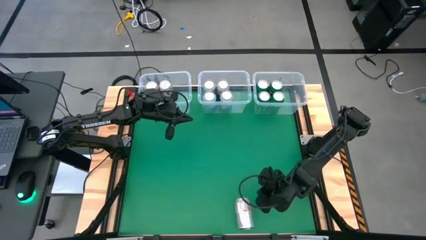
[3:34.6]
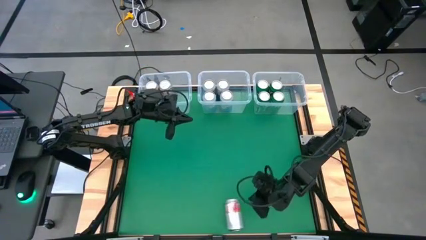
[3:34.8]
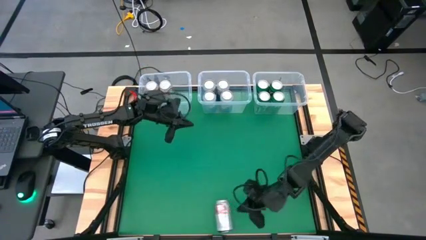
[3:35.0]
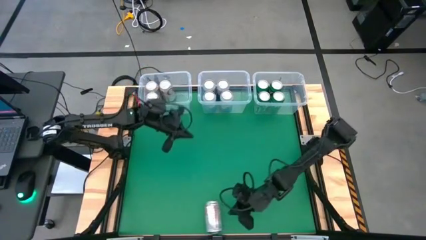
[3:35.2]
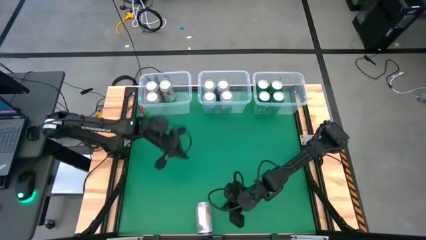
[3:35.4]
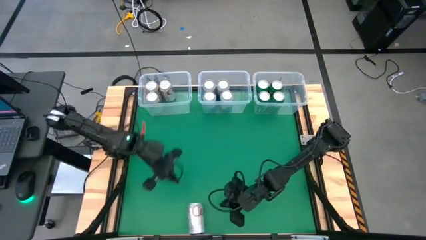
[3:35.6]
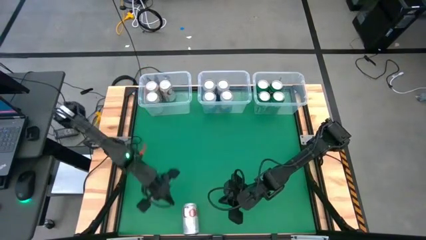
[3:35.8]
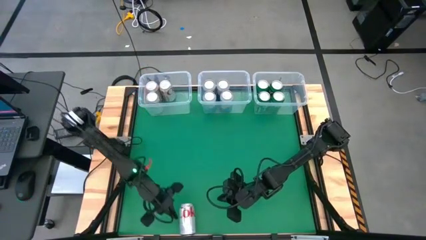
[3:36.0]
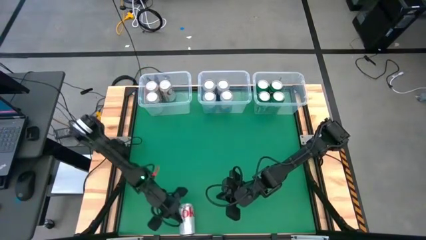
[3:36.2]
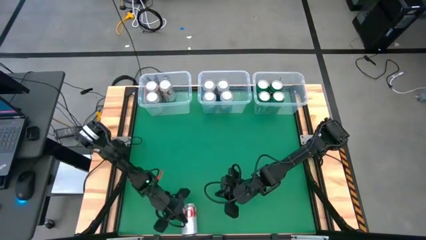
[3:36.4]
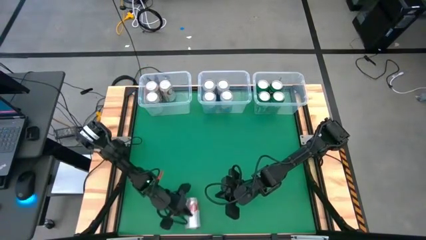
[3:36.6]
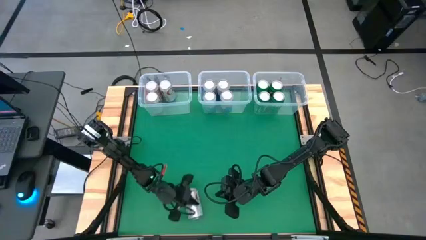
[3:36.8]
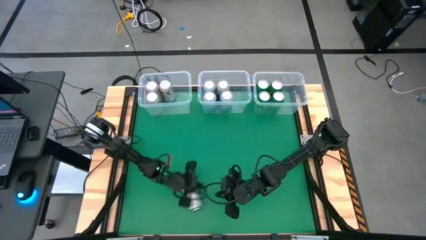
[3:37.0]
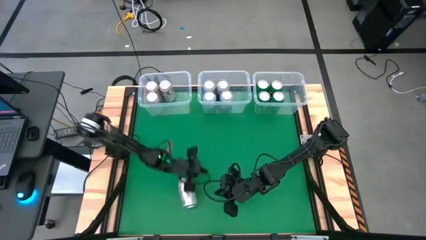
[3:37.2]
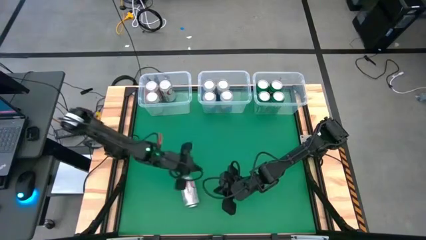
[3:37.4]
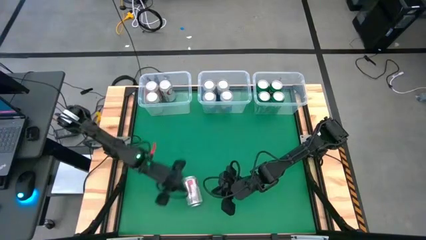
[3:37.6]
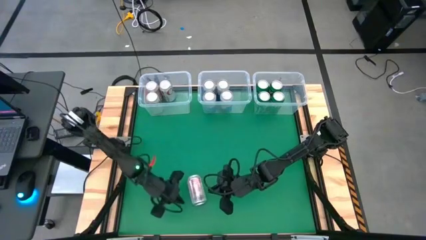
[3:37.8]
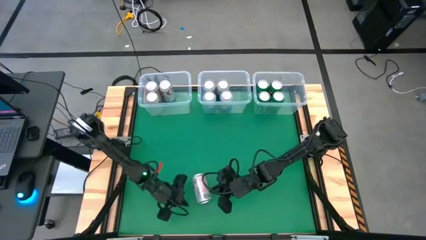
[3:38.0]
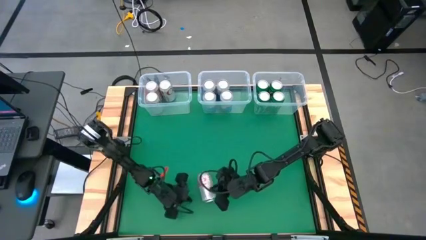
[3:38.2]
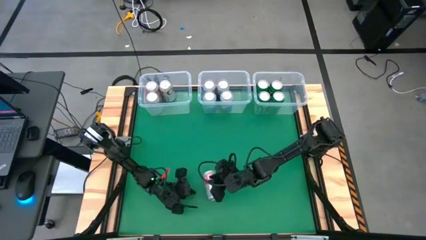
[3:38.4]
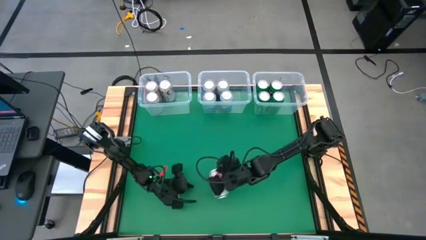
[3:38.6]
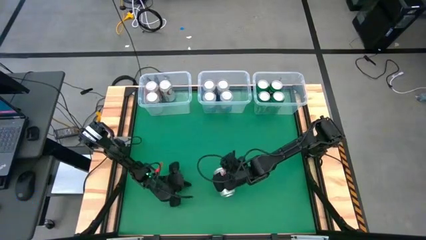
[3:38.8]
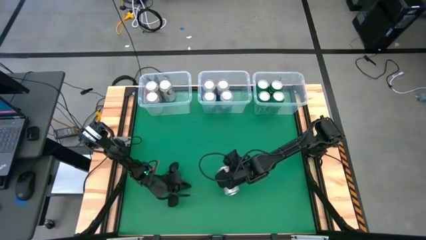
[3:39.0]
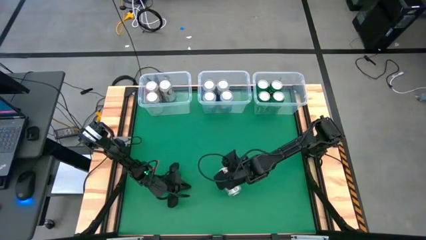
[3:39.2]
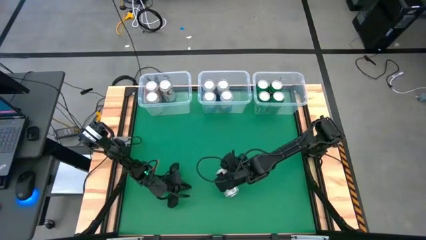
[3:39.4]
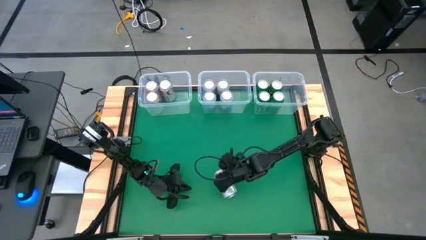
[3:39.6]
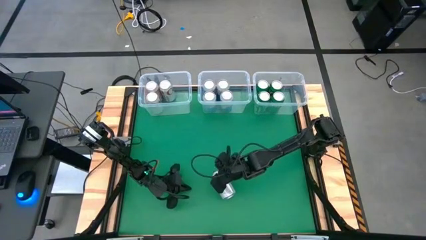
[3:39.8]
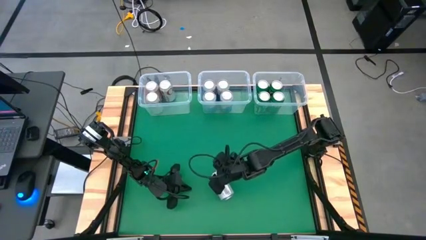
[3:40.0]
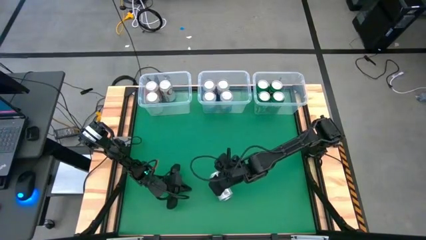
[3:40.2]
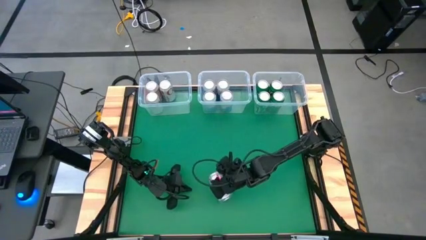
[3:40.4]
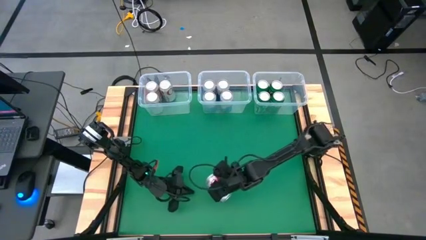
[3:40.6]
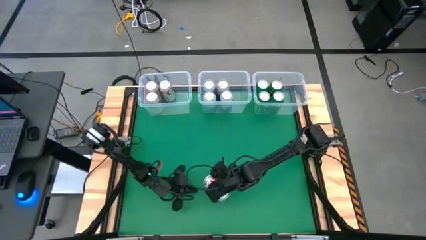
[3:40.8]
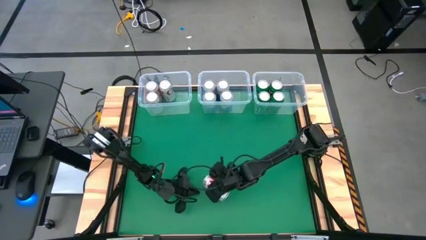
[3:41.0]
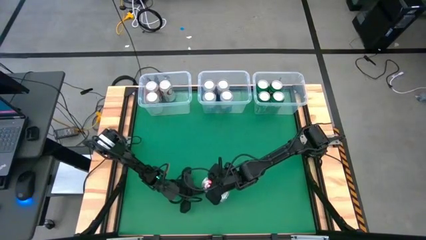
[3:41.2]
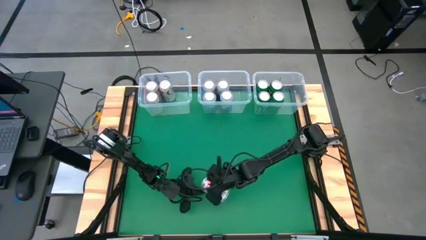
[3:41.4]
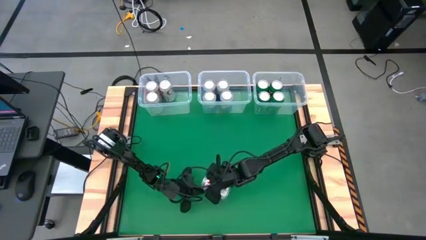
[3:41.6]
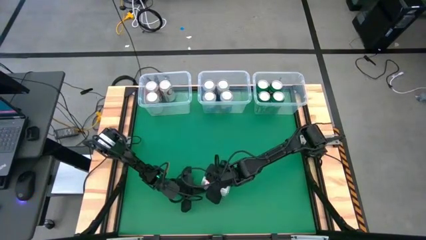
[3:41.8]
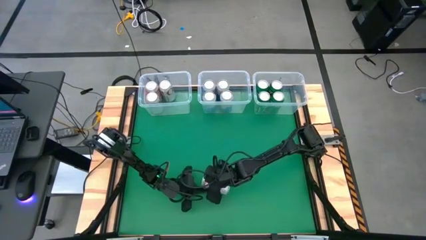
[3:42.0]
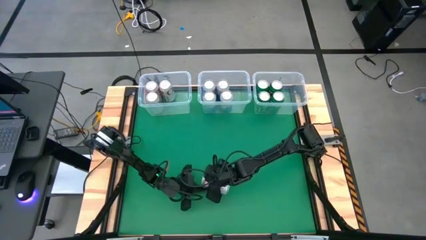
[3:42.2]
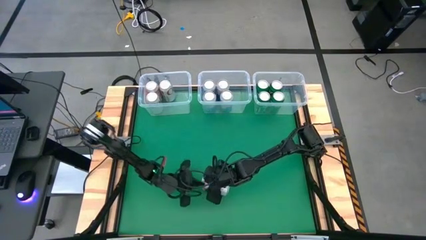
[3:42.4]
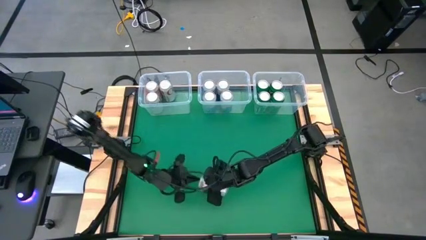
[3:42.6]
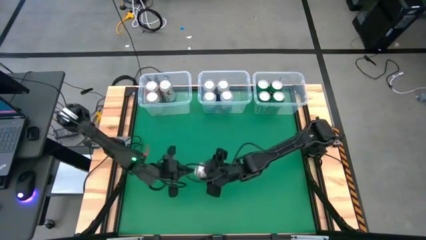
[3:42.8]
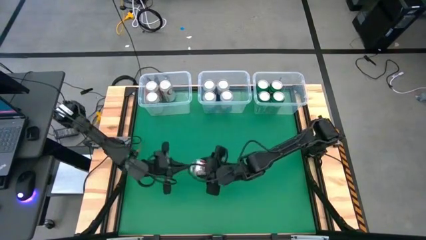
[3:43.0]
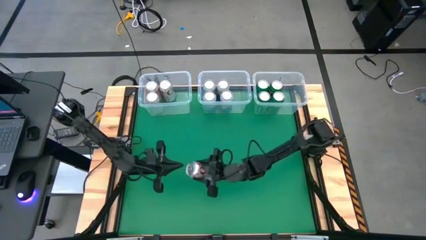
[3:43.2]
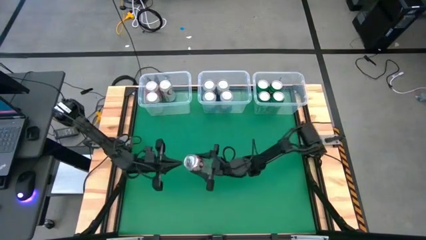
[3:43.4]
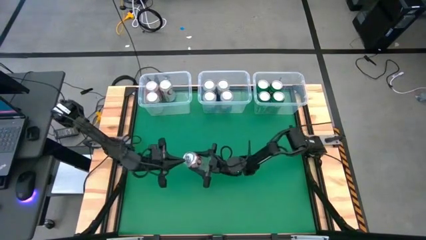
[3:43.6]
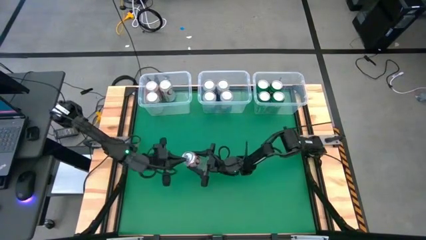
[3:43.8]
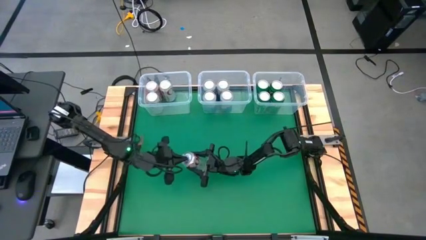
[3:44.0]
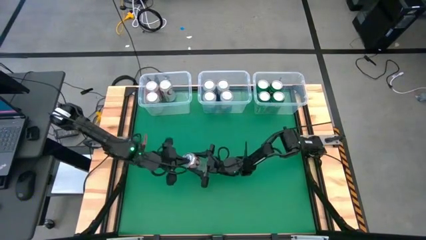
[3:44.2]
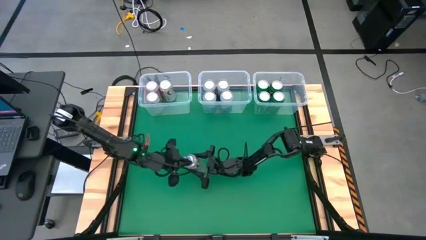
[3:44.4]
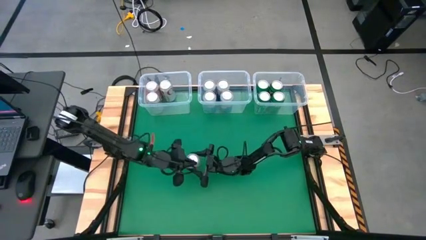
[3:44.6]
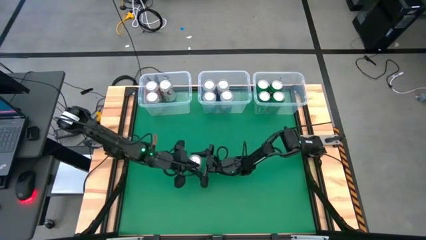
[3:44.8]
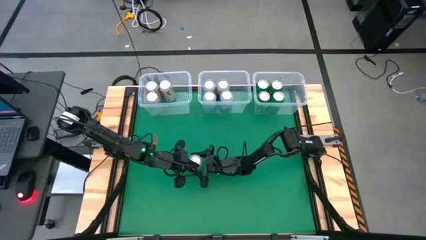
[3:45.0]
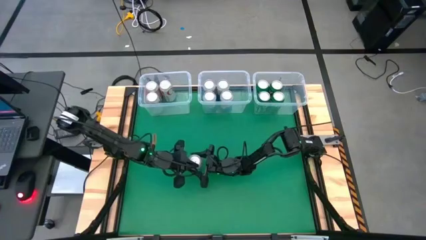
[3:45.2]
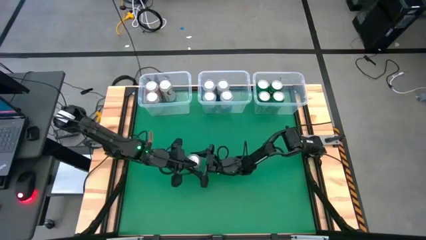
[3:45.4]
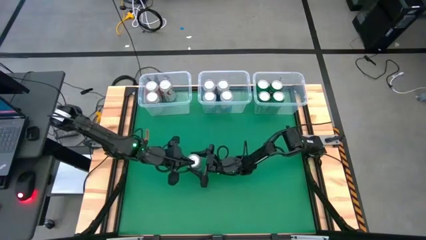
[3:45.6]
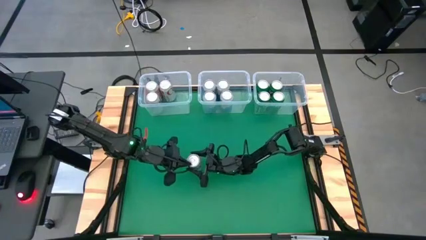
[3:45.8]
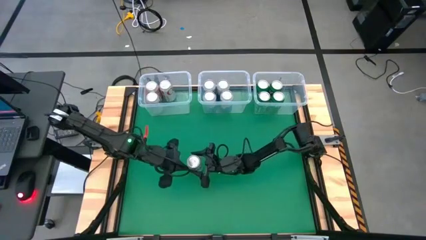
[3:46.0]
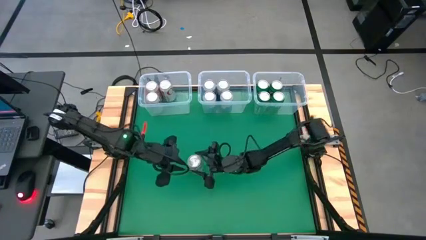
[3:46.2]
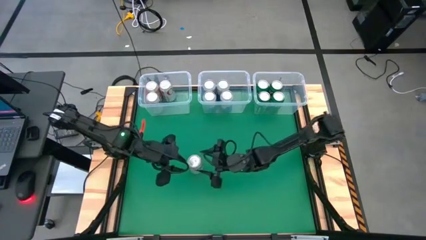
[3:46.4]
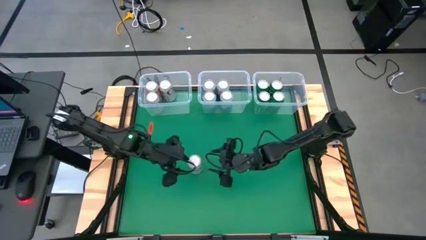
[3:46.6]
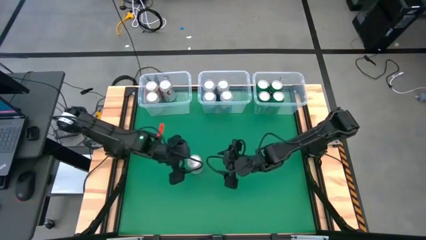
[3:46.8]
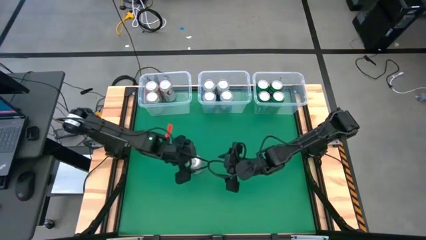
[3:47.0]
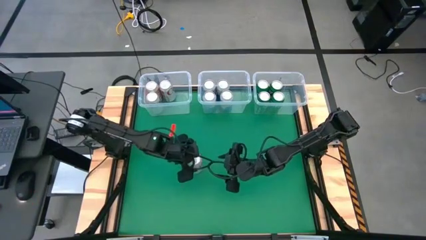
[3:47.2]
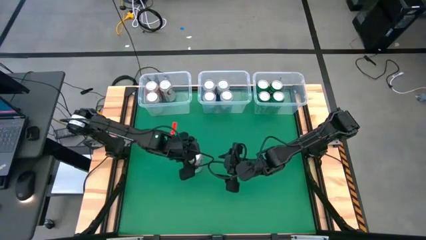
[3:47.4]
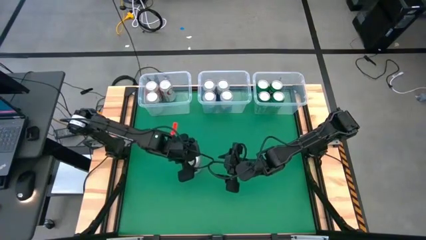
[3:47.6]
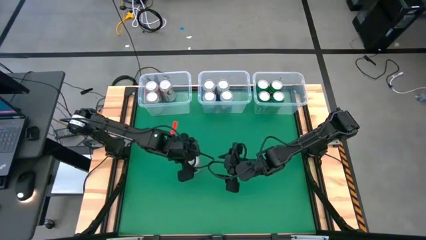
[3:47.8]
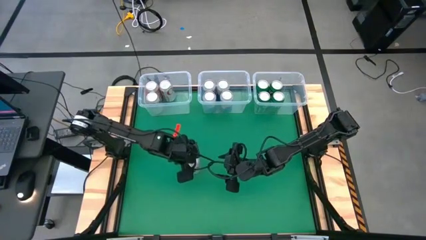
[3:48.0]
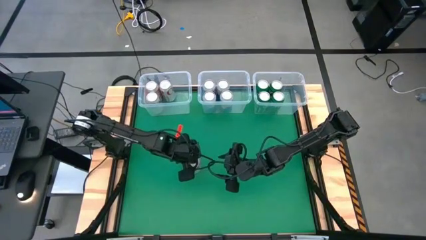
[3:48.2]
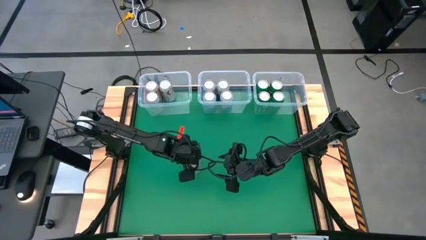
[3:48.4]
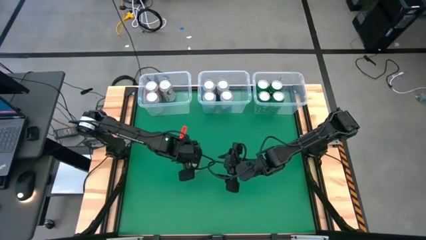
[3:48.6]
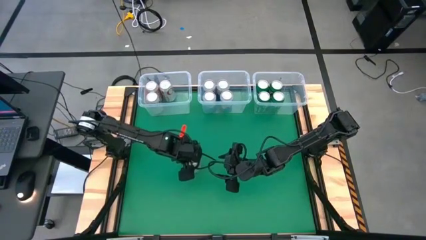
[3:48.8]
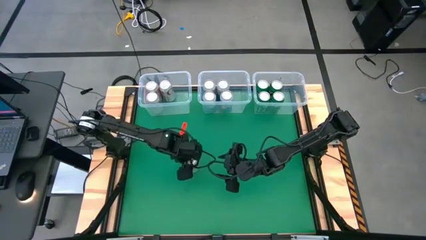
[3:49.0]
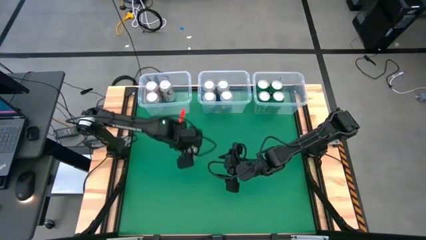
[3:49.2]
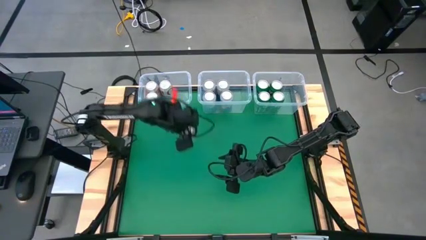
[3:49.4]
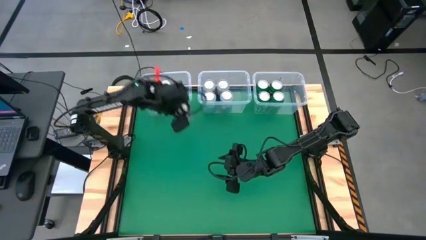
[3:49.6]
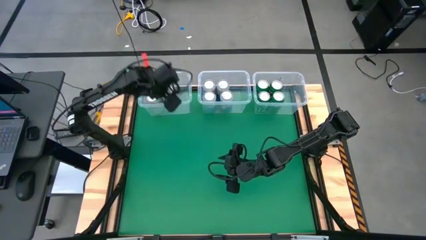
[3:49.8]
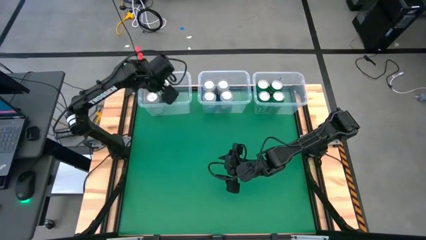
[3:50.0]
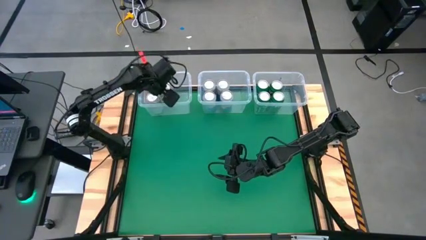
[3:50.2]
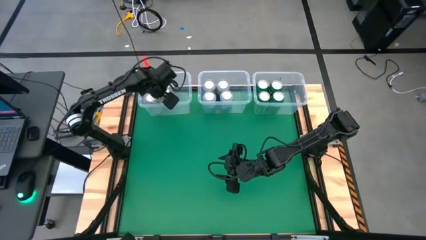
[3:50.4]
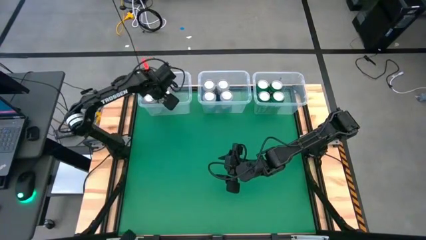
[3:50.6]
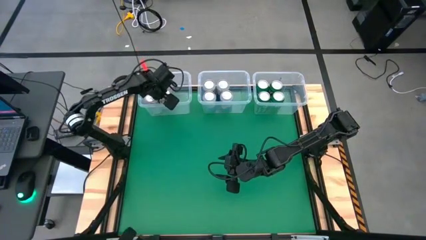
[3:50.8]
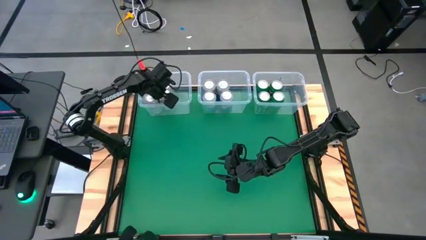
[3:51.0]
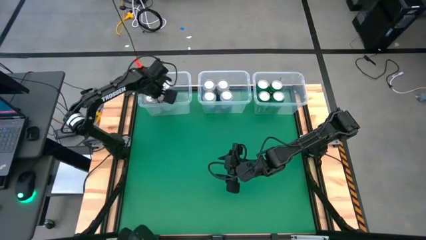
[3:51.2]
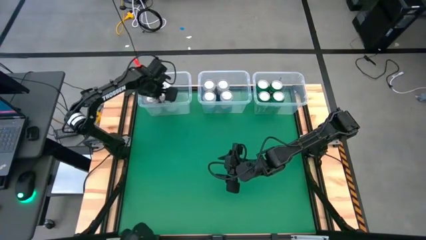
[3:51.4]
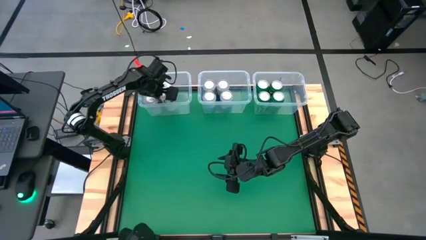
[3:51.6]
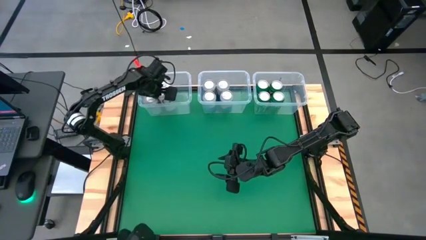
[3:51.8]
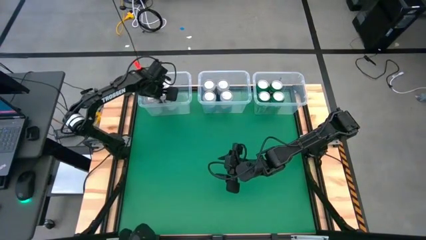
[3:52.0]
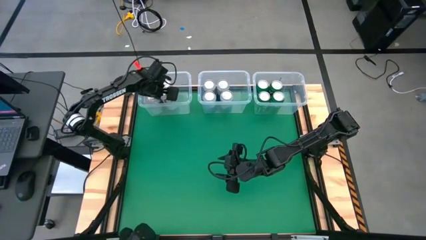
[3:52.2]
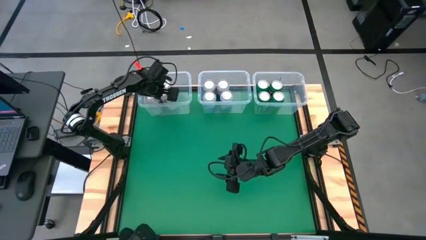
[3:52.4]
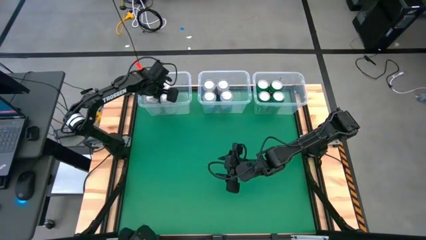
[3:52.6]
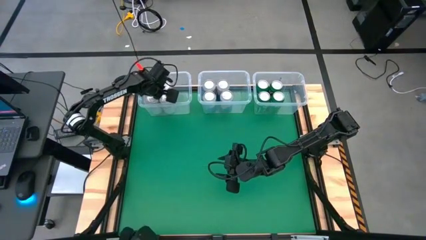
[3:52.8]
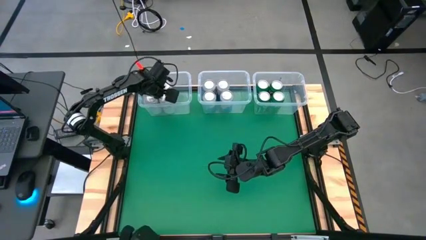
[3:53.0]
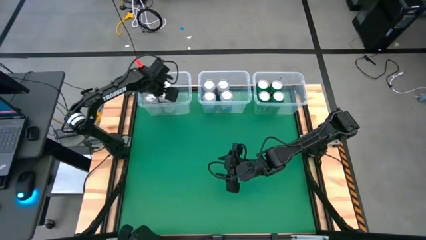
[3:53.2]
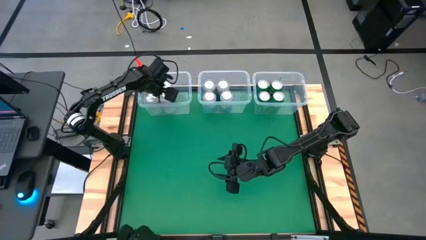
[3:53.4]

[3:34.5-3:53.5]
Task: Sort soda cans
Put the red silver soda can into the left transparent bin
